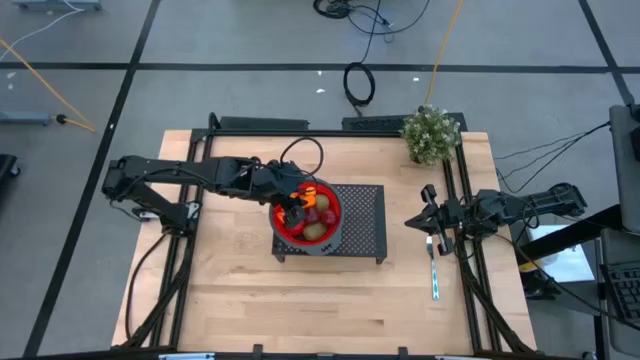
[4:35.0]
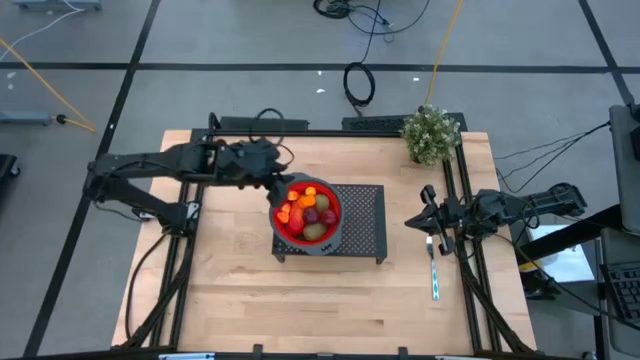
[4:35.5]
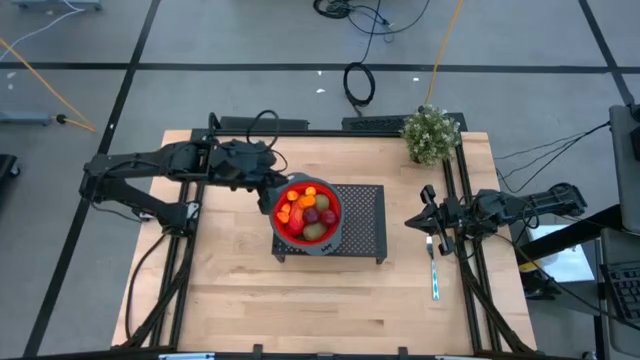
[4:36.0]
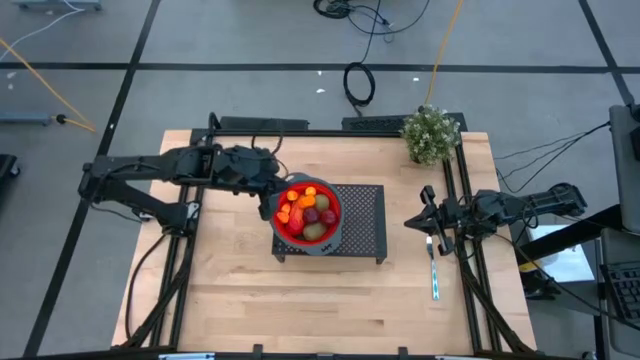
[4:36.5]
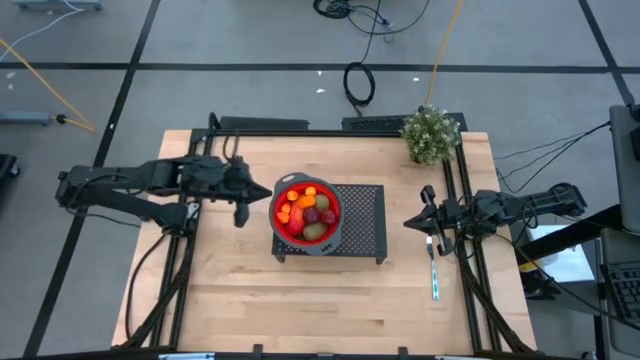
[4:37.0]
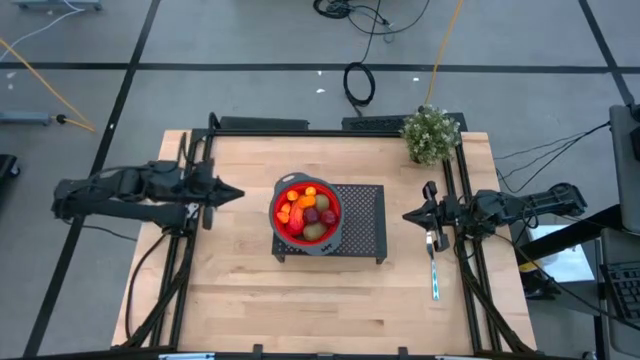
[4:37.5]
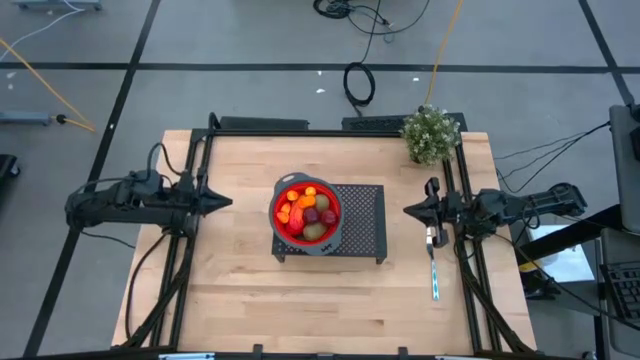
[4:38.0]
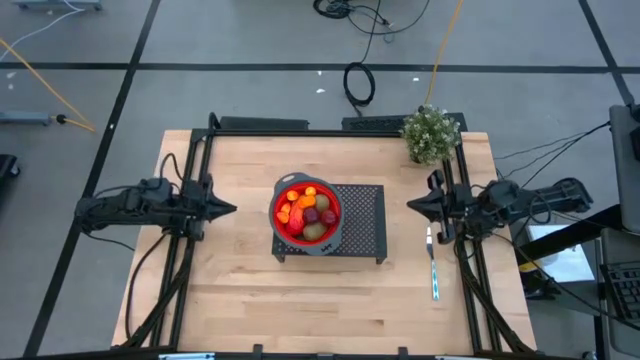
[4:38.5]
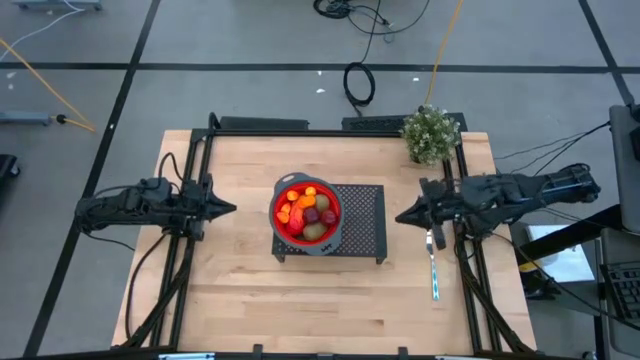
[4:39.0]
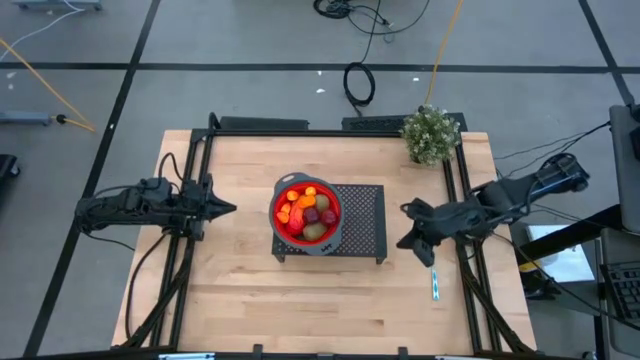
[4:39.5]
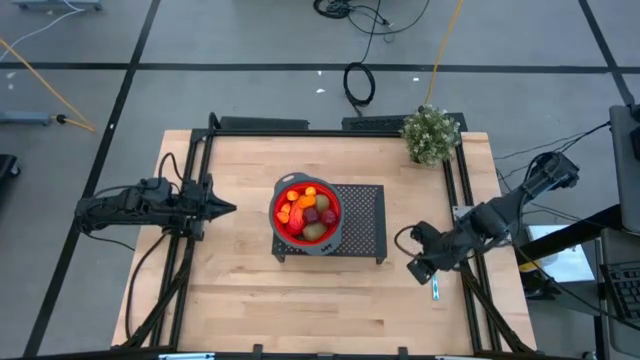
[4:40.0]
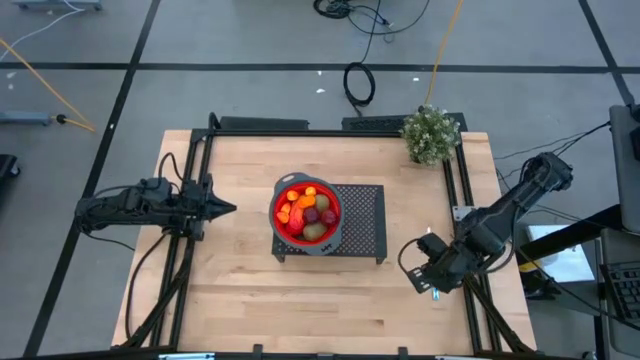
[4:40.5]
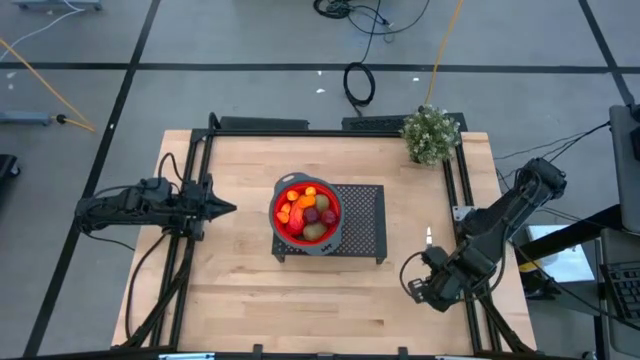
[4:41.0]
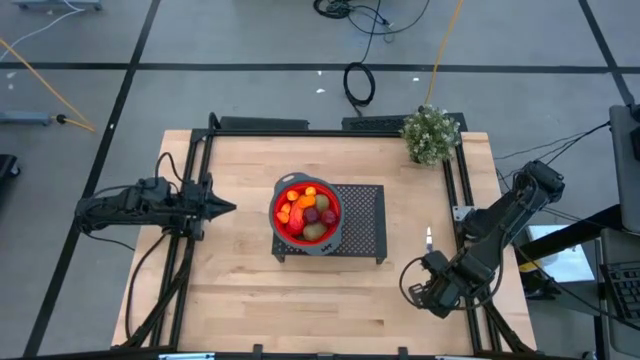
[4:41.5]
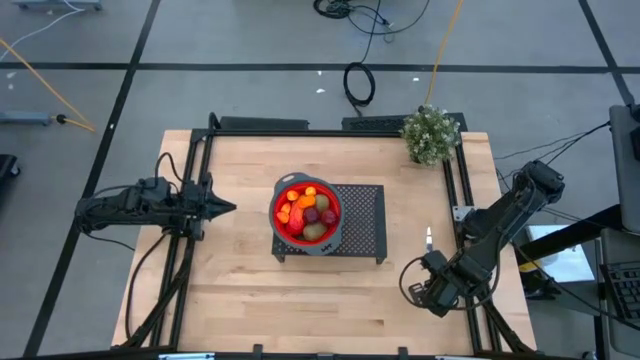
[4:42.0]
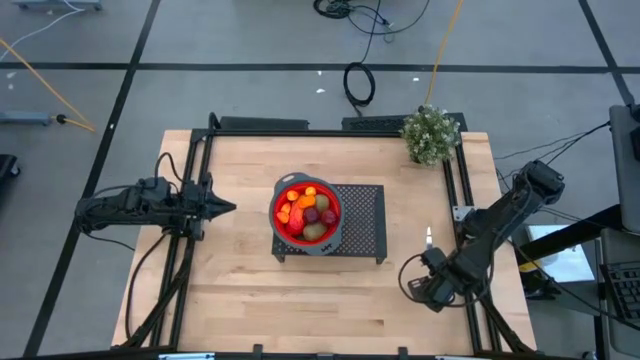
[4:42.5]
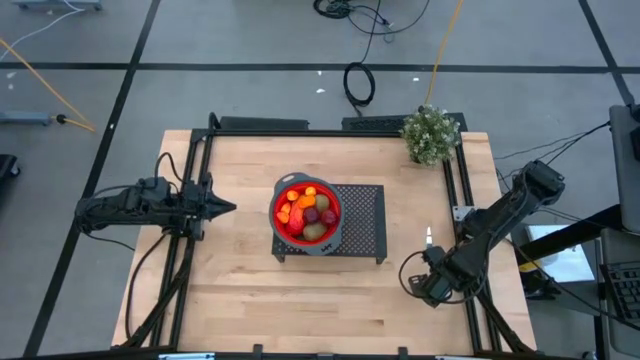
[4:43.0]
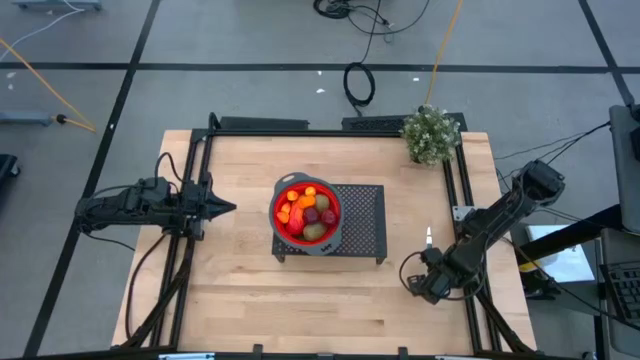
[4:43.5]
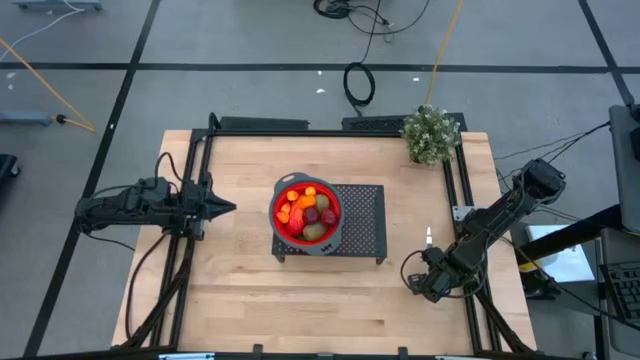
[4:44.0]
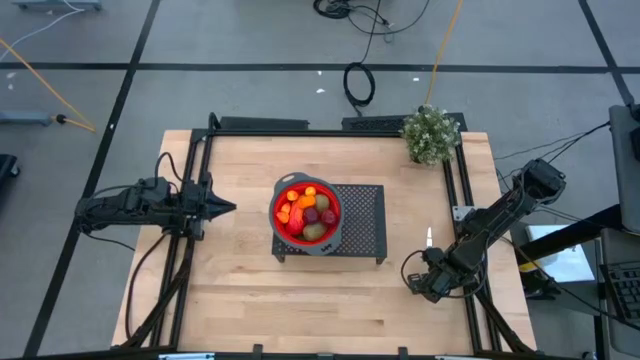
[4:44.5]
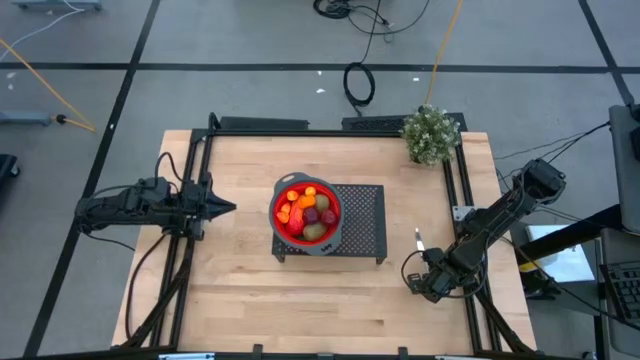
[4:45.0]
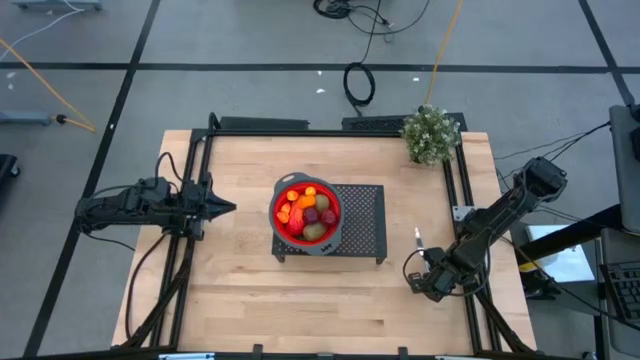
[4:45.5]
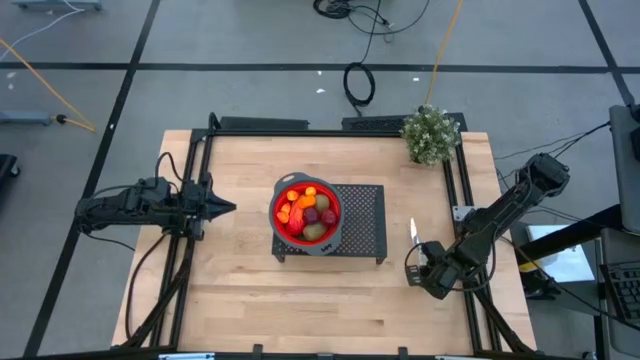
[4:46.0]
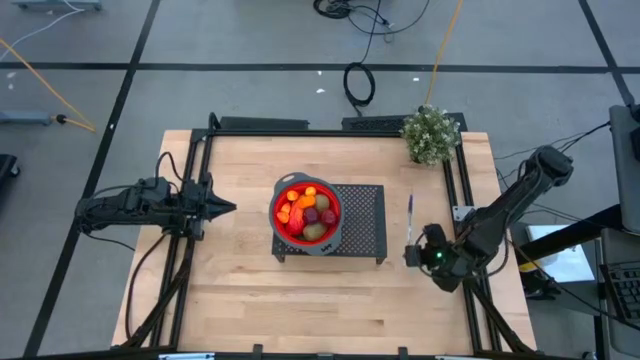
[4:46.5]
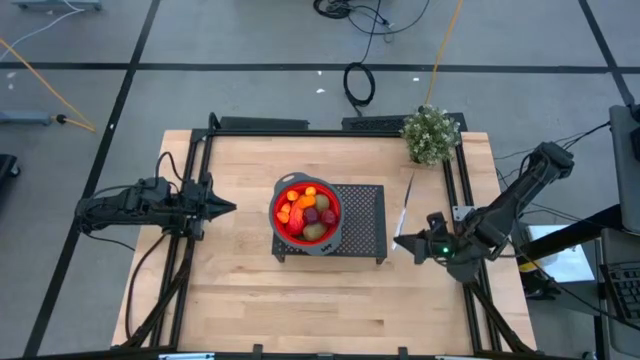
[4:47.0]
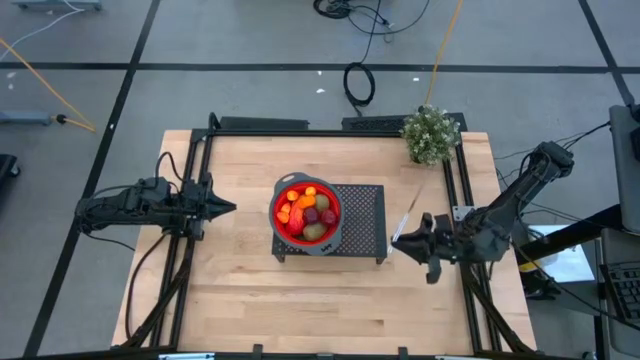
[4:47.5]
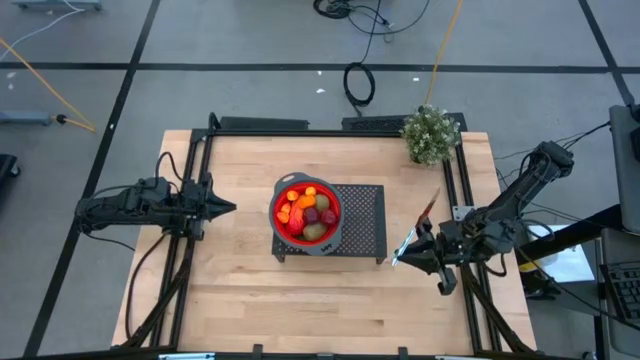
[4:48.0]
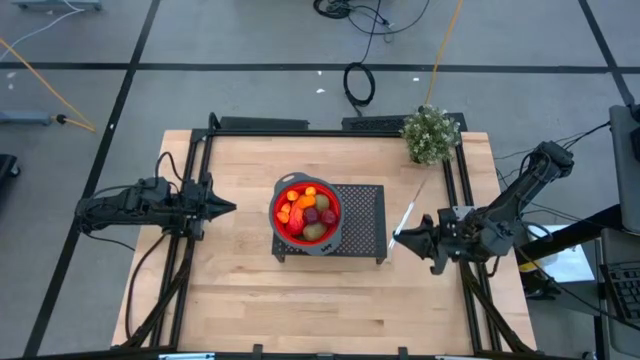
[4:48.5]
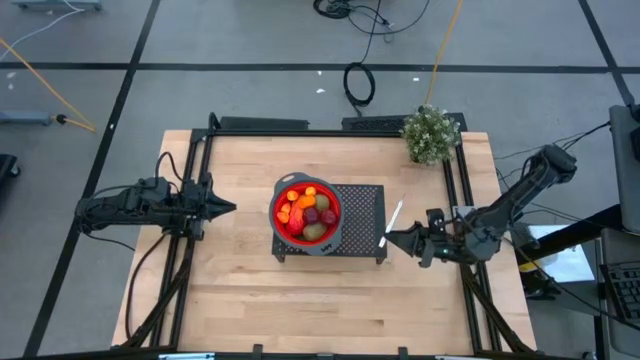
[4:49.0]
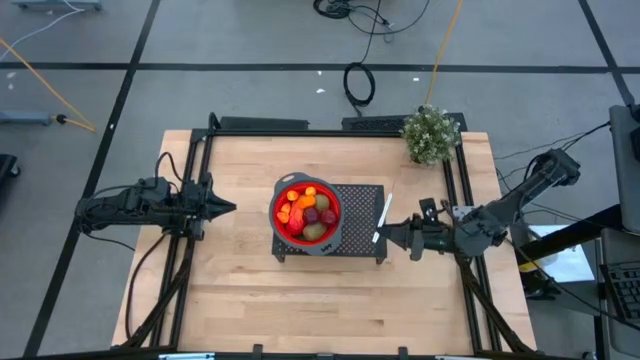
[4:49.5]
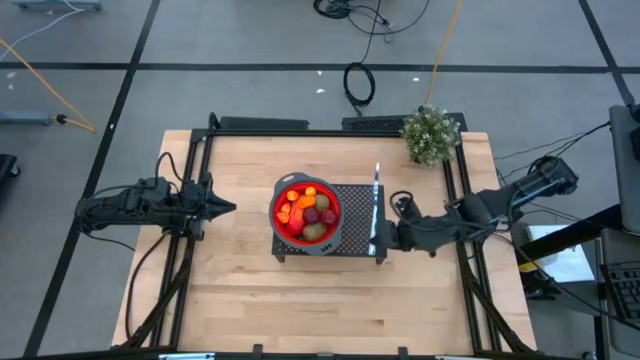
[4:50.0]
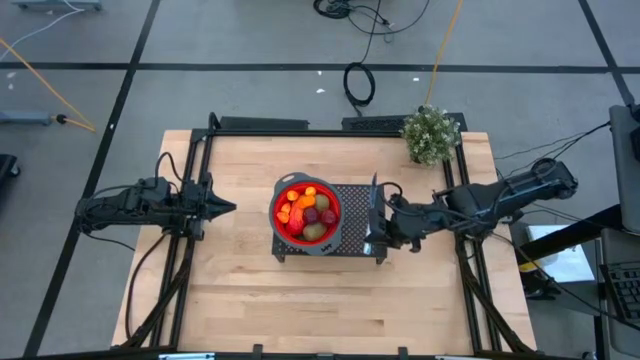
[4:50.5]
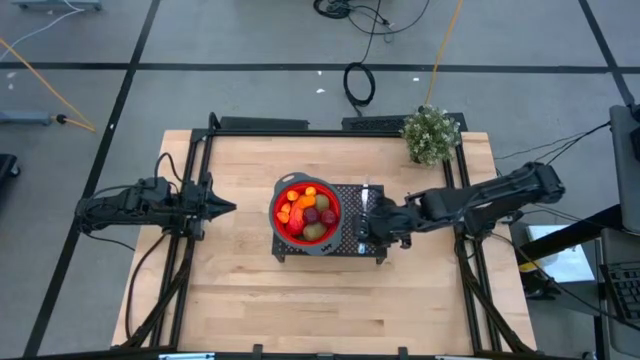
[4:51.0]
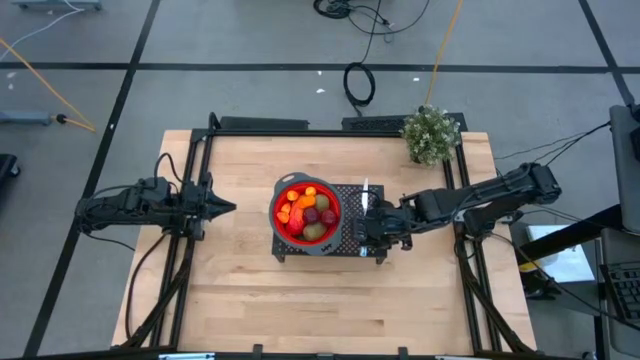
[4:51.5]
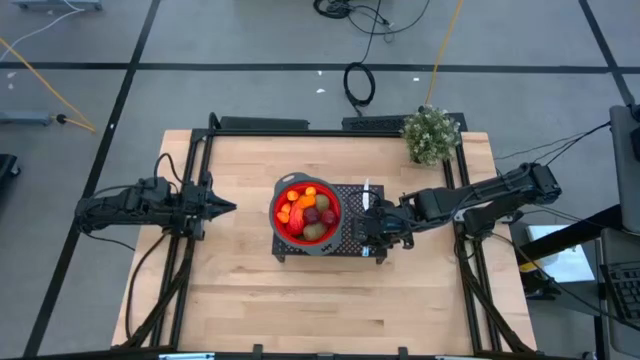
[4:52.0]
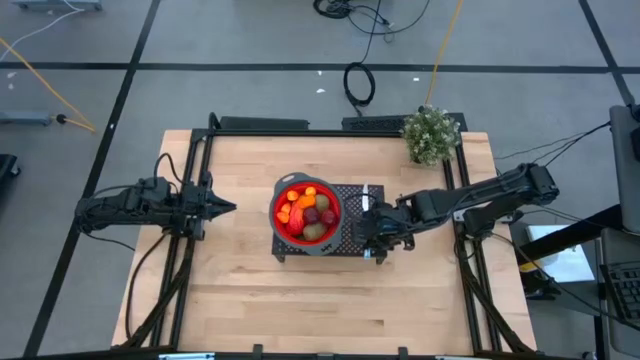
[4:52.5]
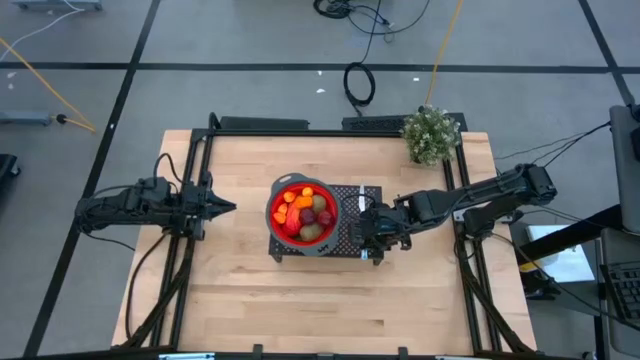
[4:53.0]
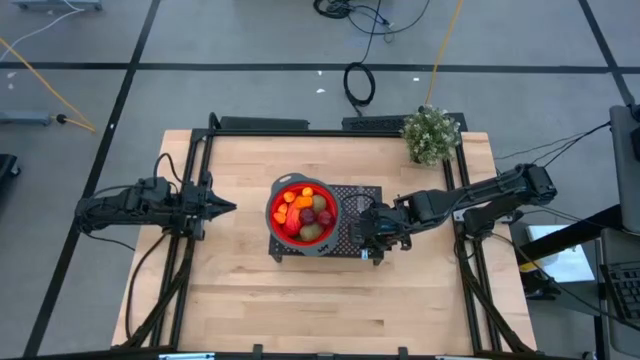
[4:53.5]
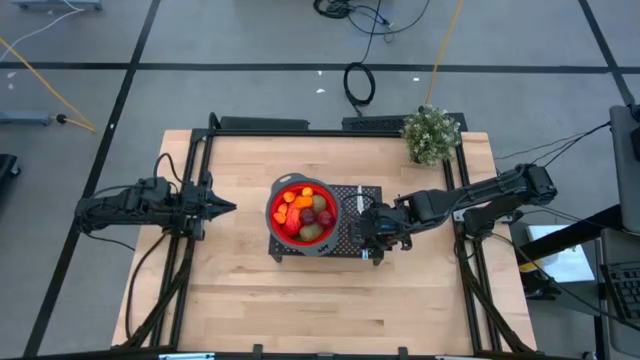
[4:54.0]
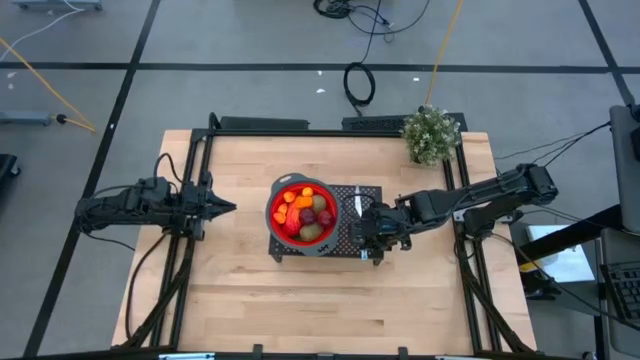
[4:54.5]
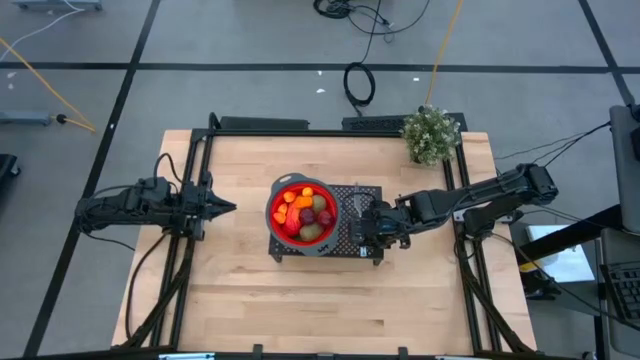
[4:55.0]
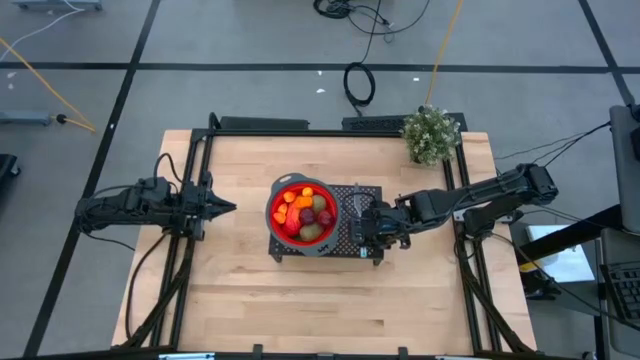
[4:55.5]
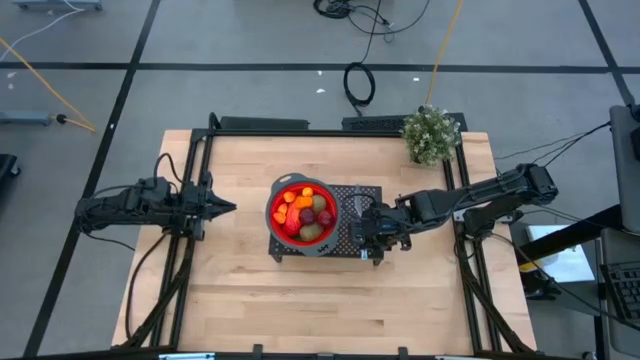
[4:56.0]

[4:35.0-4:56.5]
Task: Pick & Place Fruit
Put the patterned blue table knife on the shelf beside of the red colander

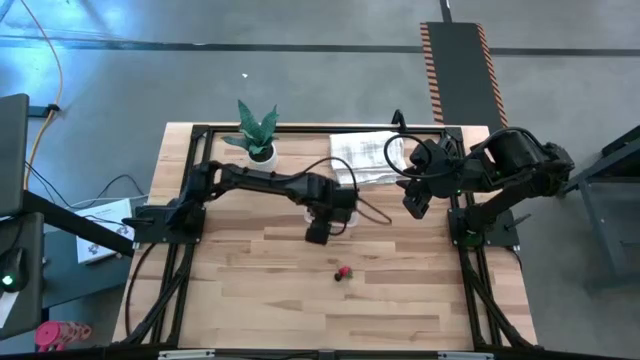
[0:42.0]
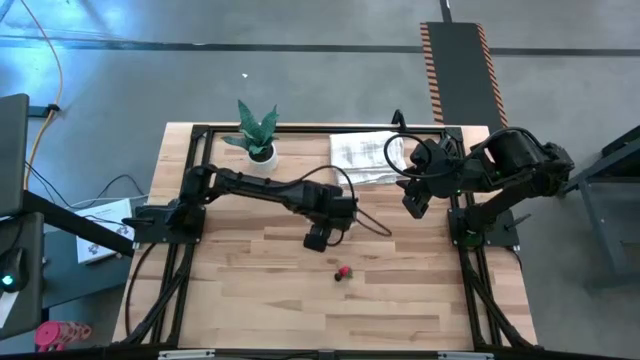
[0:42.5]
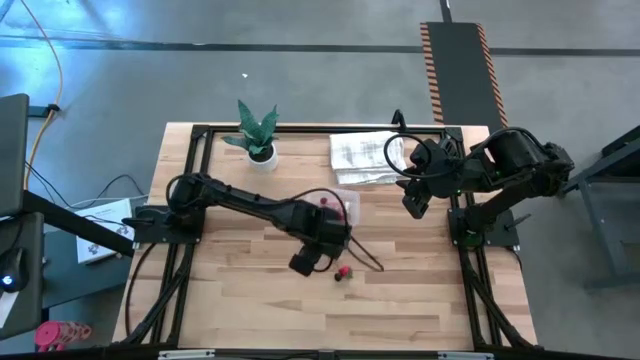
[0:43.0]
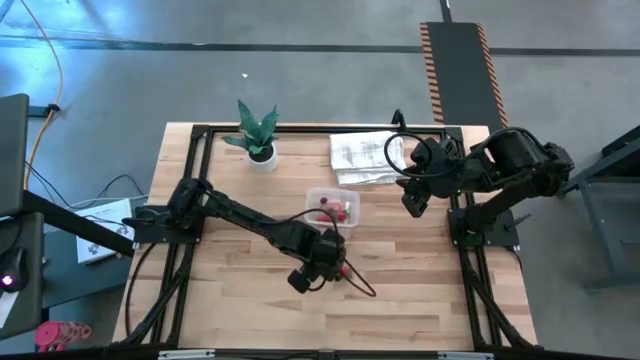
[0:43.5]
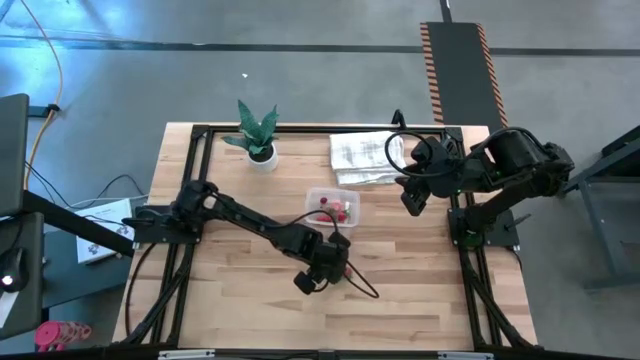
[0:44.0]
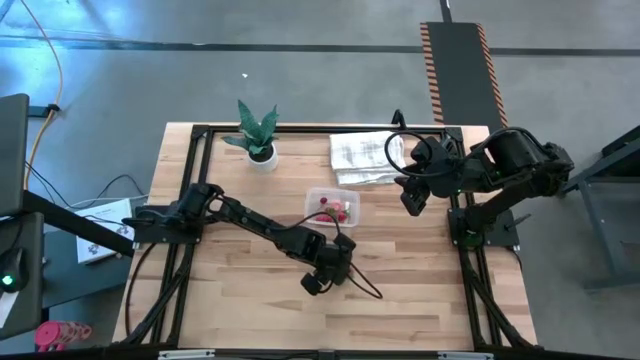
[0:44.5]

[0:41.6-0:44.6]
Task: Pick and placing Produce into tupperware
Put the strawberry into the transparent bin
